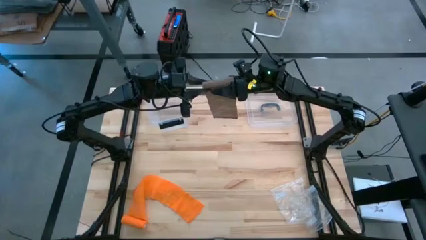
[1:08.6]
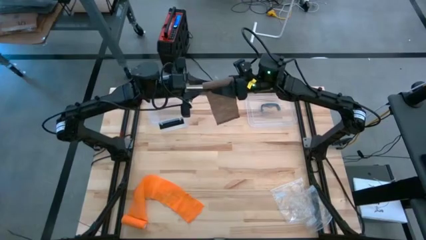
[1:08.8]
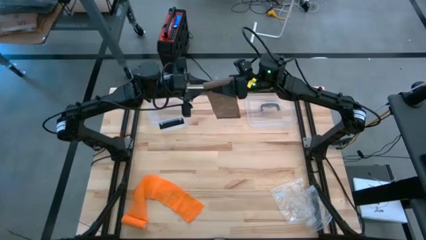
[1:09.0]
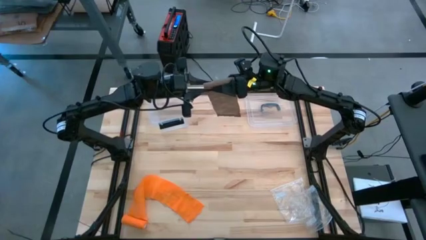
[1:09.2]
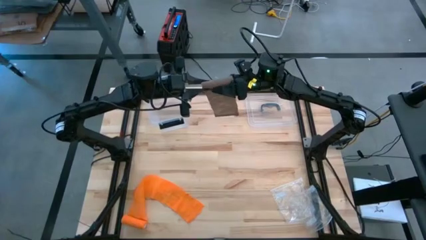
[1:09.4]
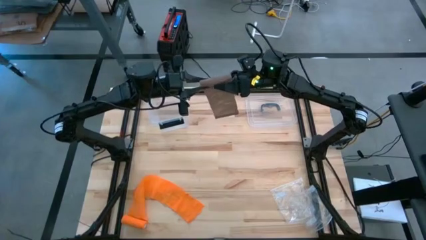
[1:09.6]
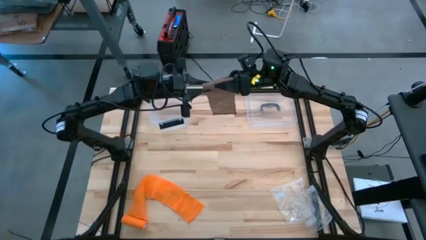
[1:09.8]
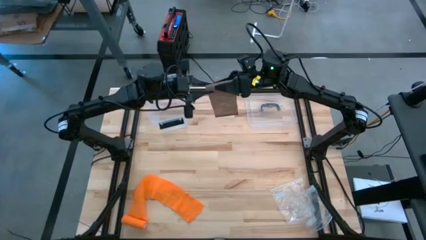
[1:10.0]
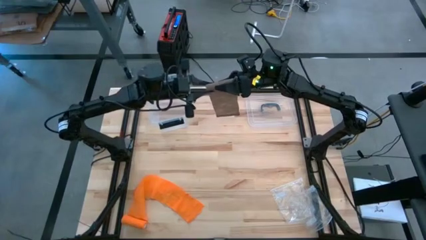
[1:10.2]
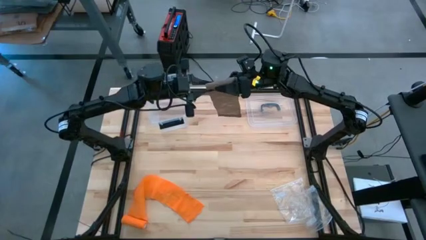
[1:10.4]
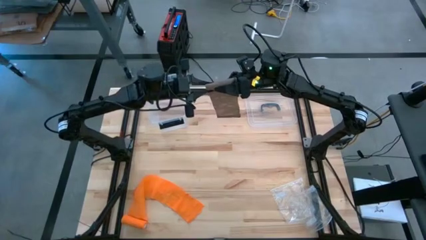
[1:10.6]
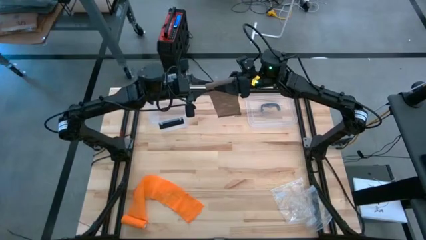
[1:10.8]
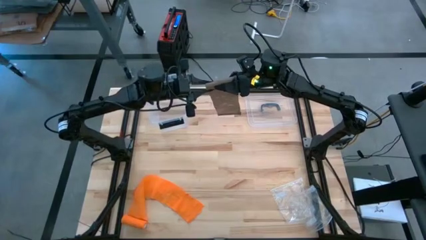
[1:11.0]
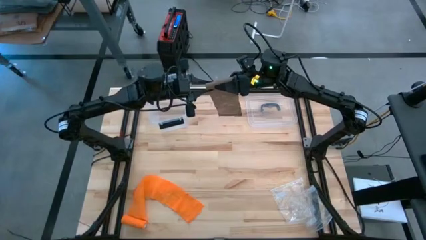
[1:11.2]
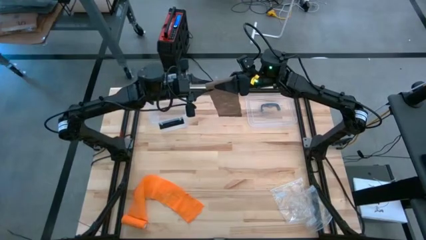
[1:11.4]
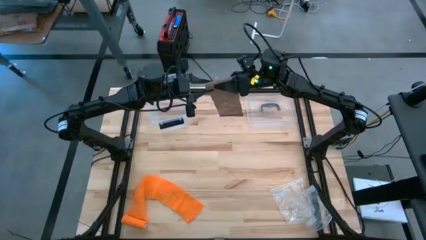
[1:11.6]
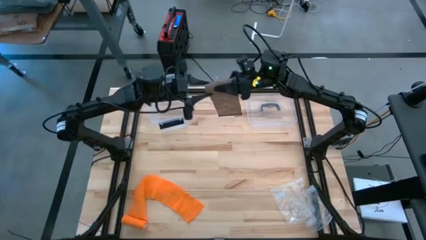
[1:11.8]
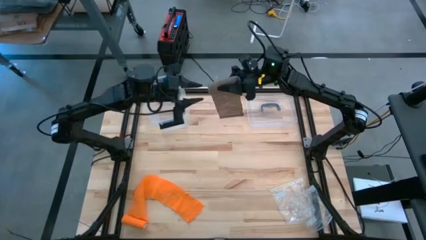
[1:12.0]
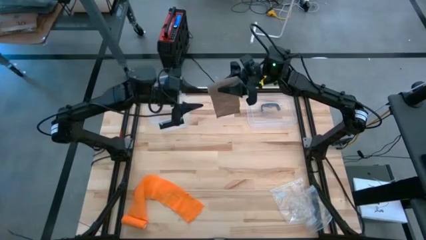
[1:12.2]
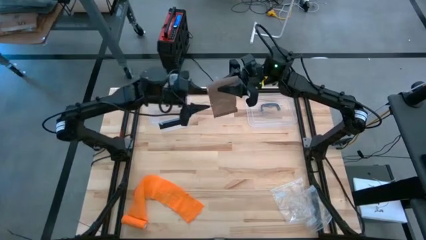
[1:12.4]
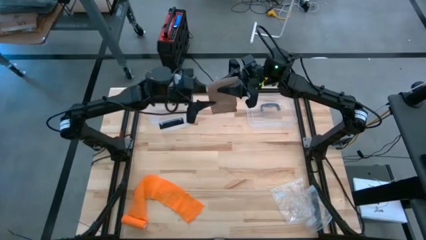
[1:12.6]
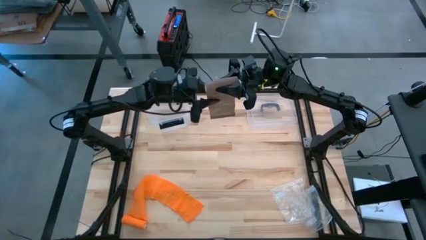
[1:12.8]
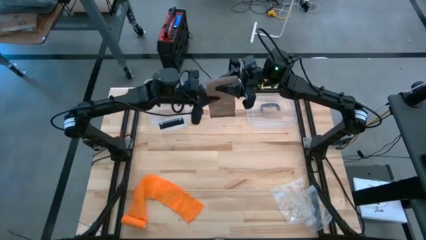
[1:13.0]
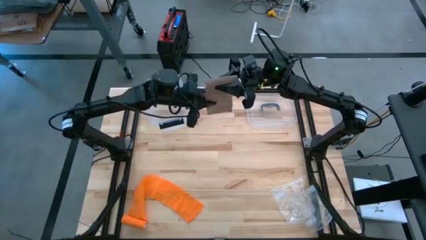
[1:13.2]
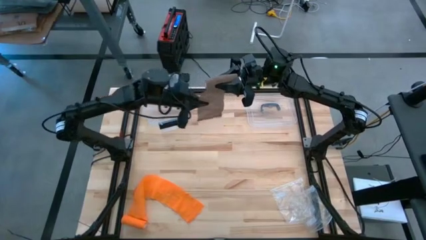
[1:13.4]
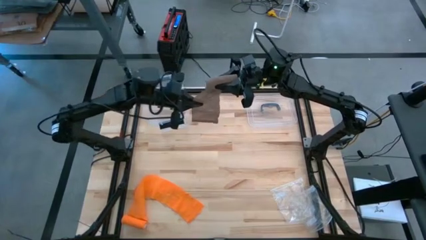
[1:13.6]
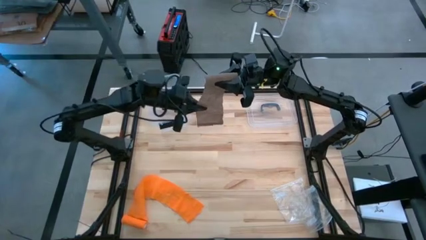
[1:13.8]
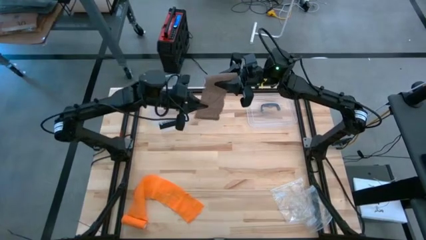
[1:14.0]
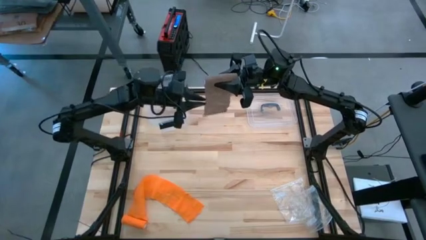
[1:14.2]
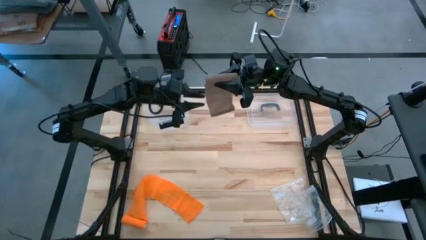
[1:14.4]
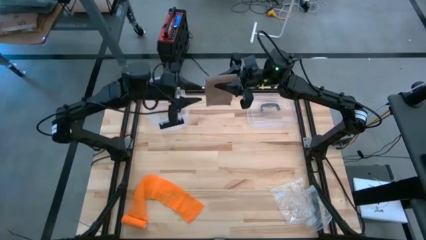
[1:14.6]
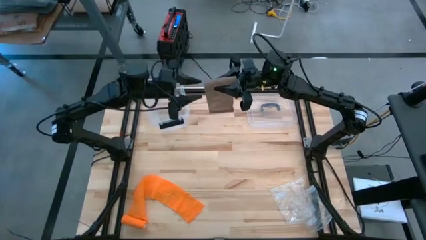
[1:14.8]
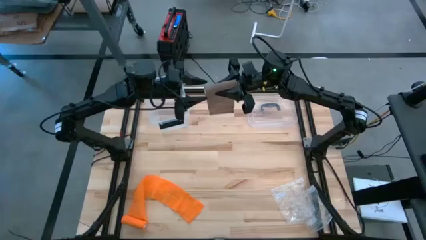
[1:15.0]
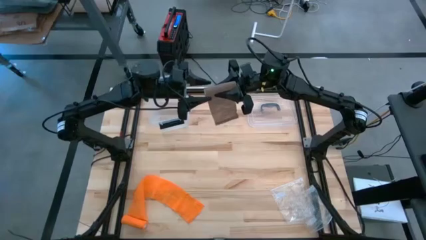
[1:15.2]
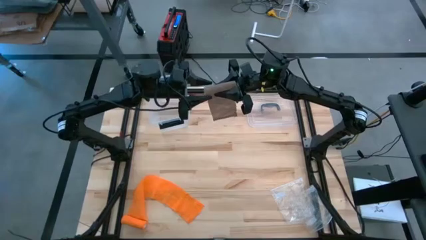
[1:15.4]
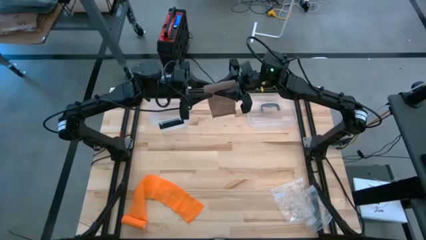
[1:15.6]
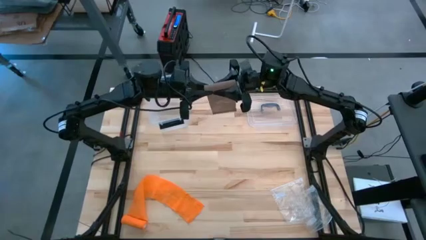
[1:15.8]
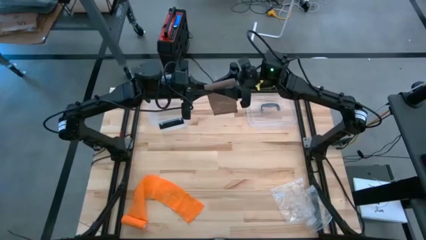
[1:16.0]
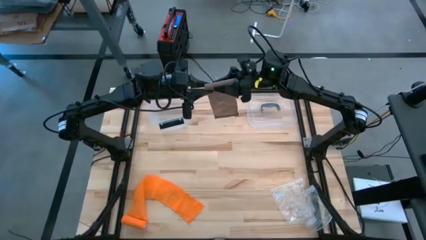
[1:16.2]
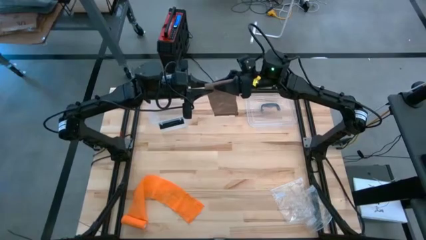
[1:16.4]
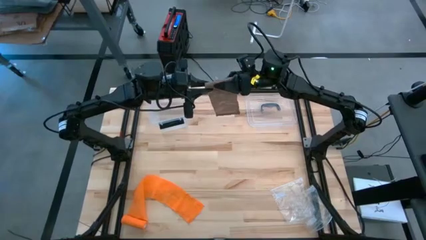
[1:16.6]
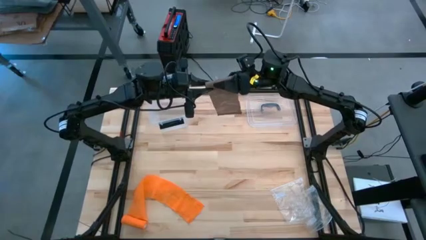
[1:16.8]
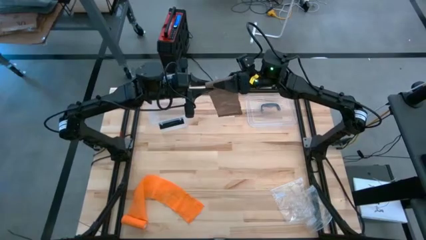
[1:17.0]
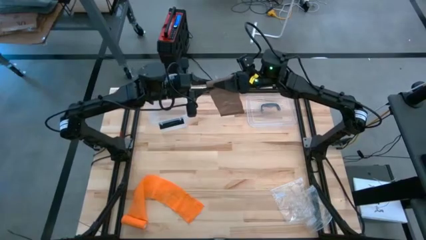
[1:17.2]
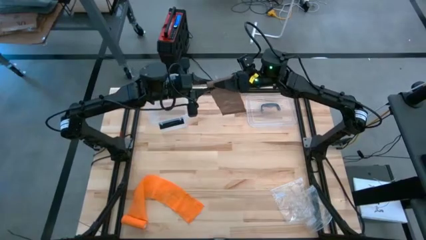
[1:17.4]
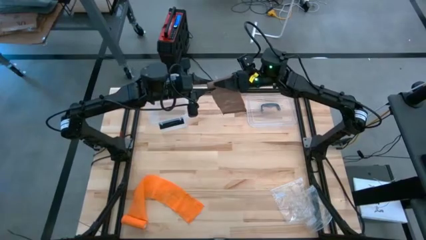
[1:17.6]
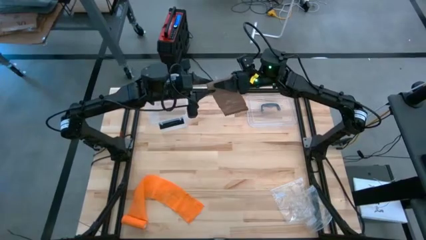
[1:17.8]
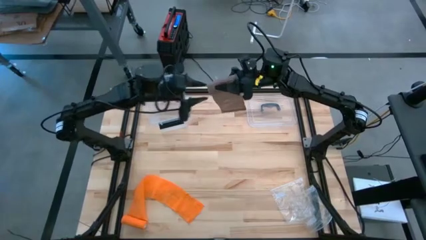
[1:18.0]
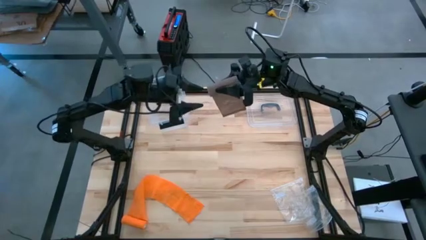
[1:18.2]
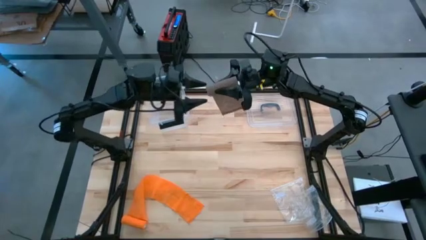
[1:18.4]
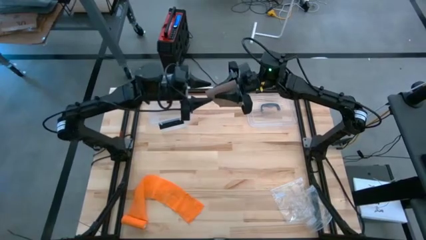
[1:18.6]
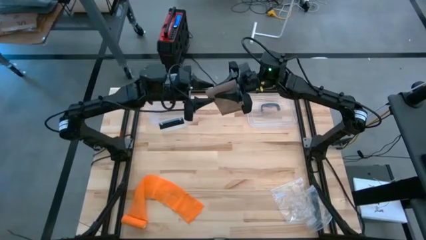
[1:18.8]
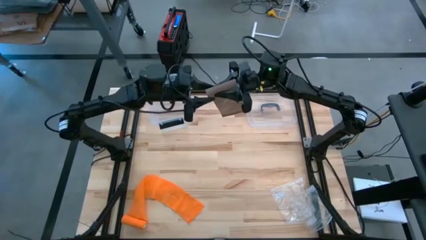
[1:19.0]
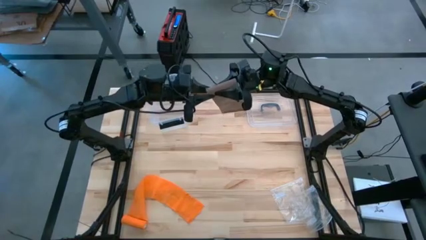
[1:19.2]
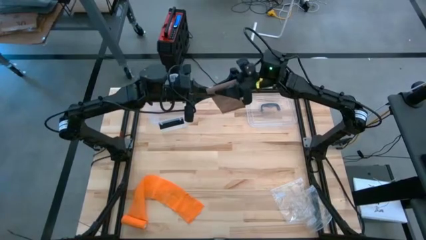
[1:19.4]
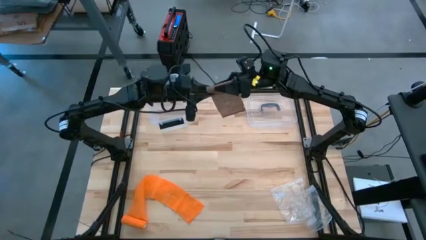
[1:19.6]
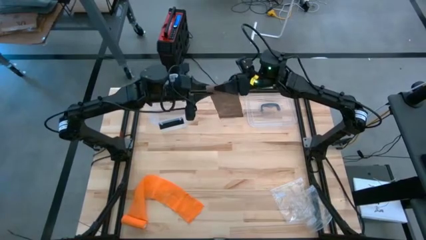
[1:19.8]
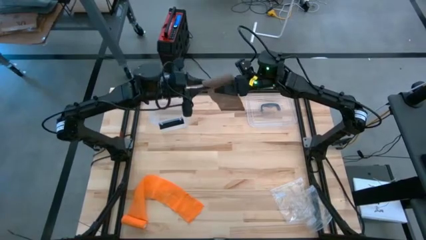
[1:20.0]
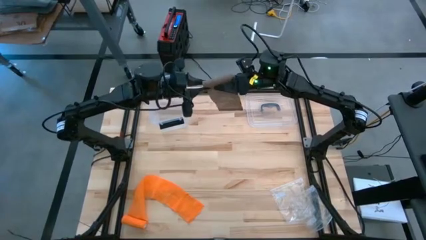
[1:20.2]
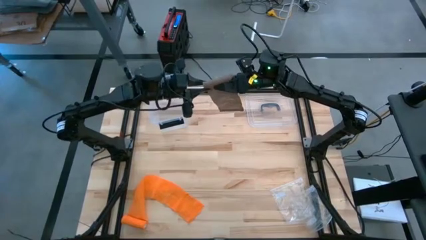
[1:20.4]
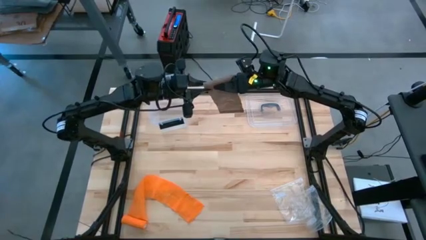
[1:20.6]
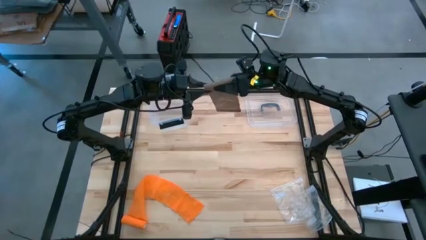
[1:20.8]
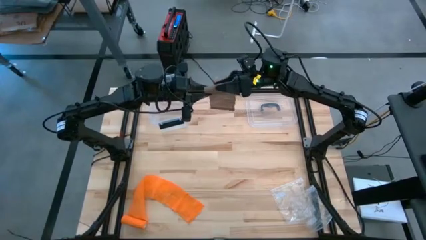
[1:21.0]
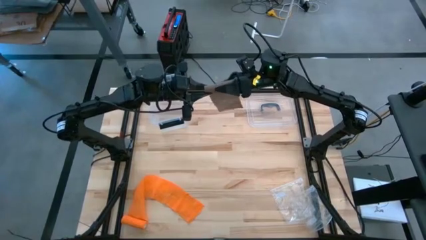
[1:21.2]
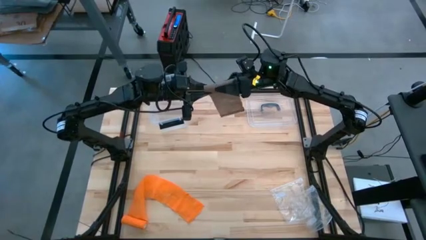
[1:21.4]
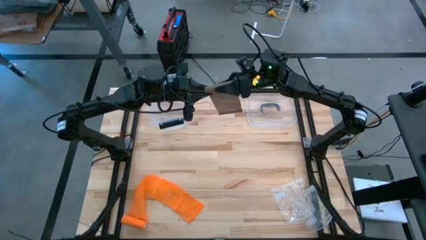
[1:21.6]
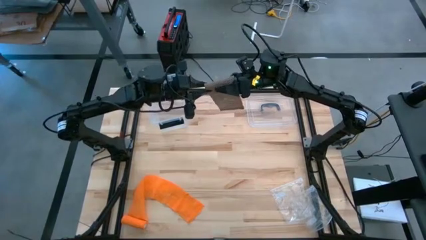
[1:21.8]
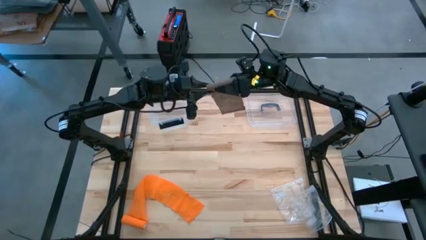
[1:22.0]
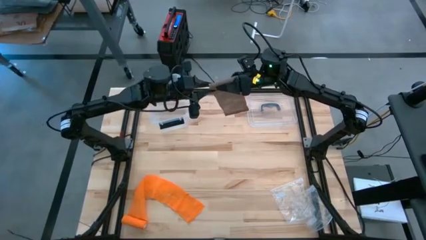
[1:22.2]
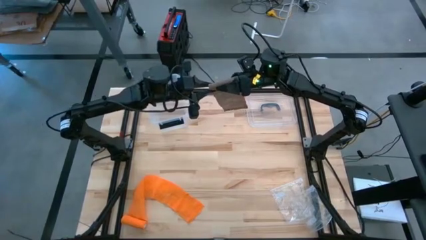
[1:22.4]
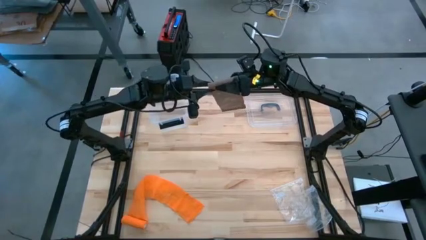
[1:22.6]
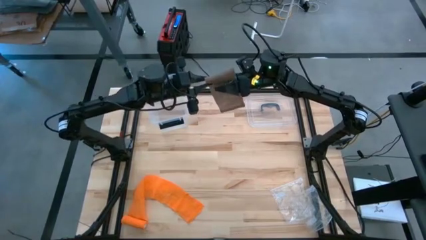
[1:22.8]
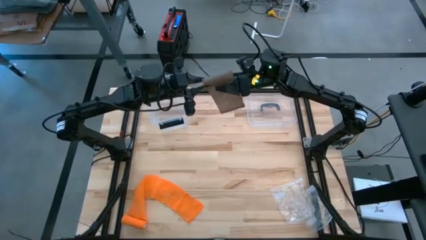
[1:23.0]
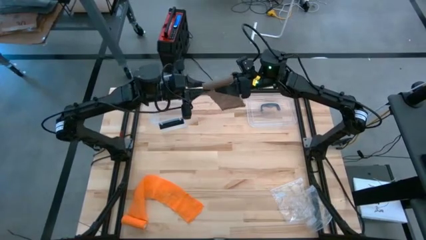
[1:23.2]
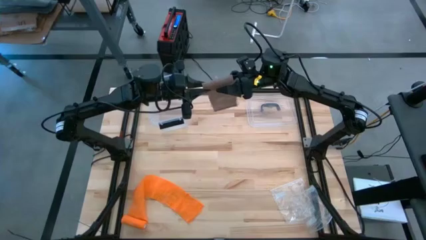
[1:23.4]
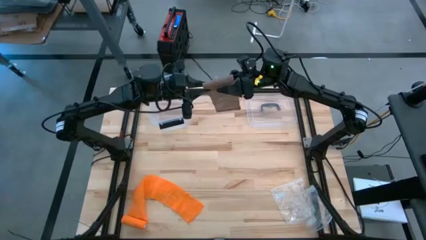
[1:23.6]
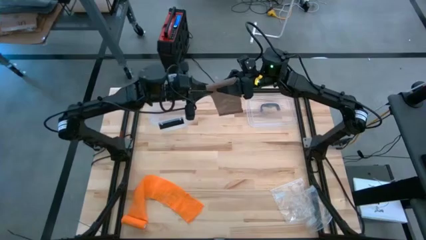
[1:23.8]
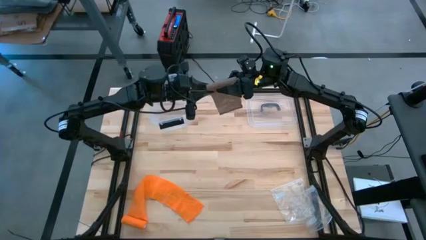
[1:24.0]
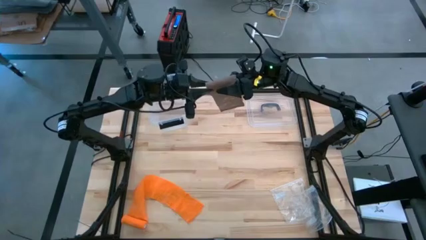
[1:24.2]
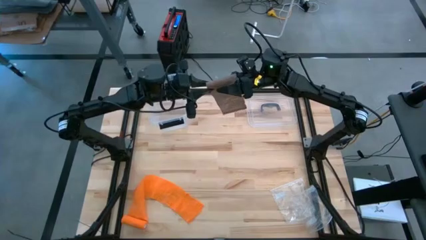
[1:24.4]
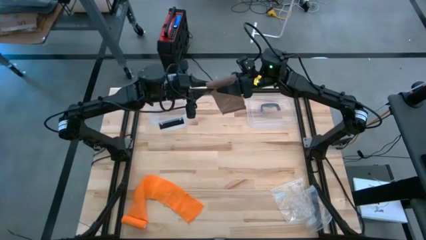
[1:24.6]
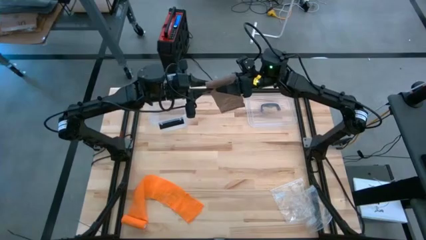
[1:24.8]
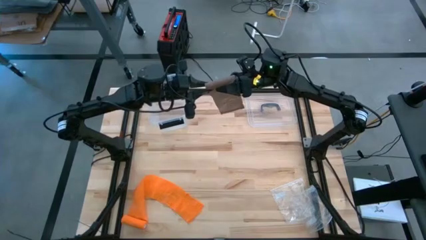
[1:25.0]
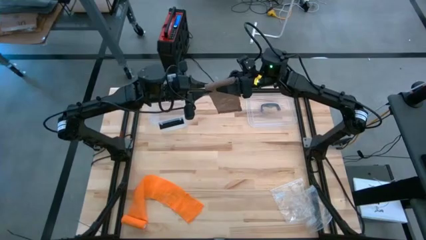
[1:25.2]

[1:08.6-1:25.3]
Task: Roll bandage
Roll the brown bandage
